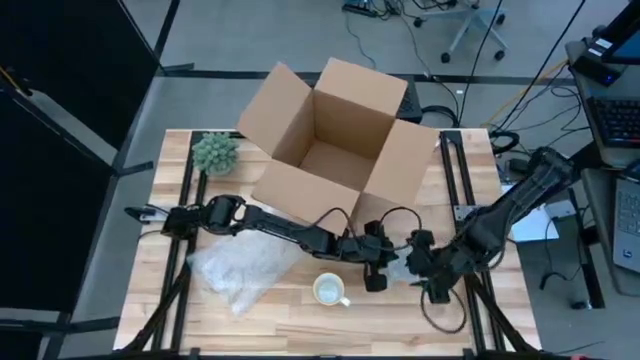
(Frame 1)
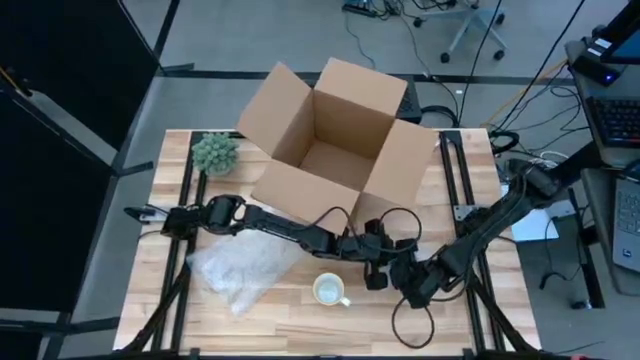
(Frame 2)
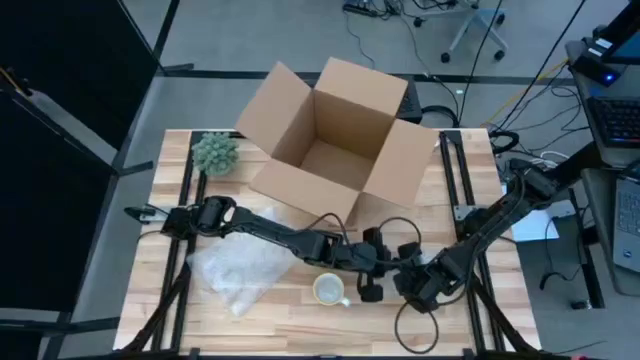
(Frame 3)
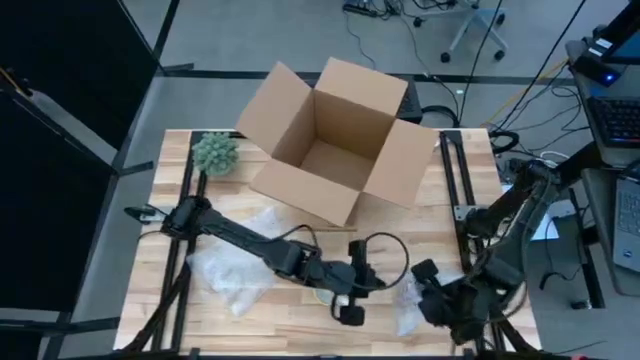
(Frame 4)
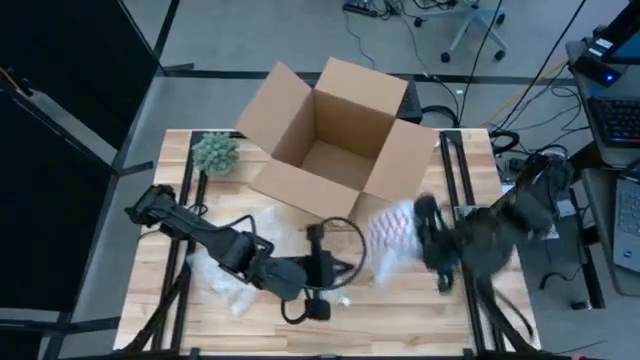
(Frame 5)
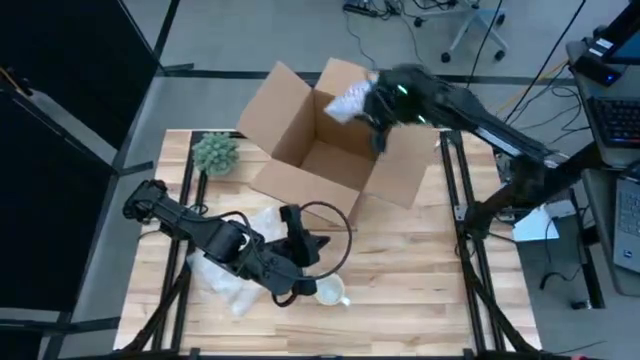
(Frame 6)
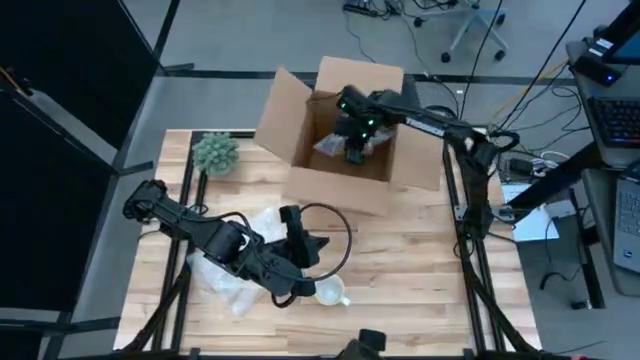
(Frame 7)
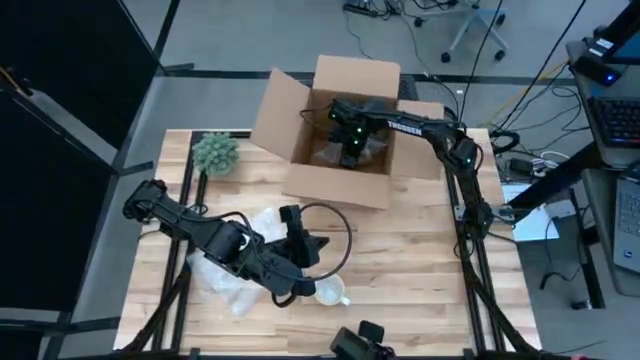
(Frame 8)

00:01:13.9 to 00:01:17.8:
Task: wrap mug
Put the red wrapped mug into the box

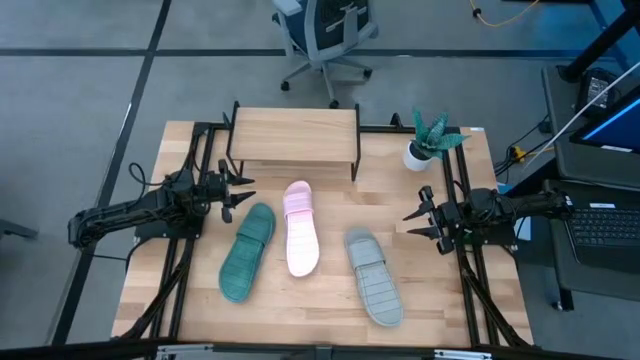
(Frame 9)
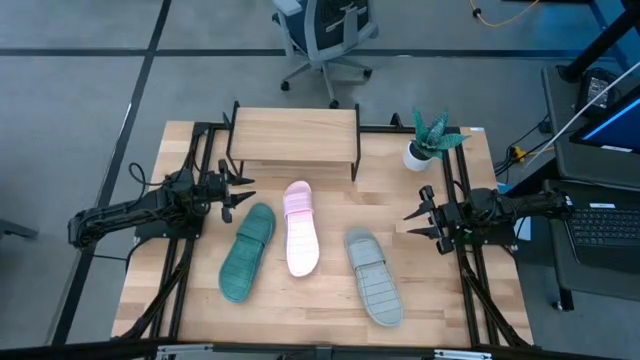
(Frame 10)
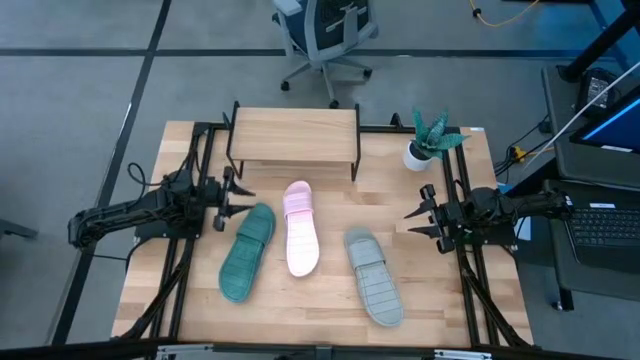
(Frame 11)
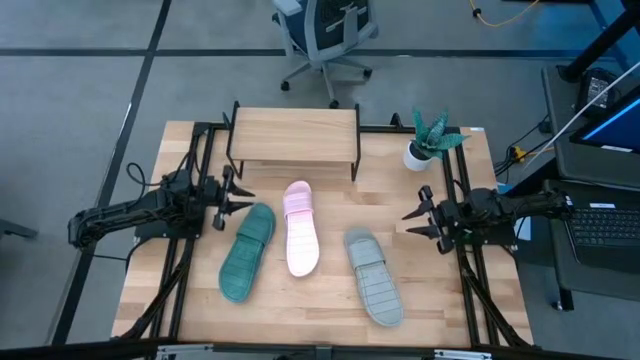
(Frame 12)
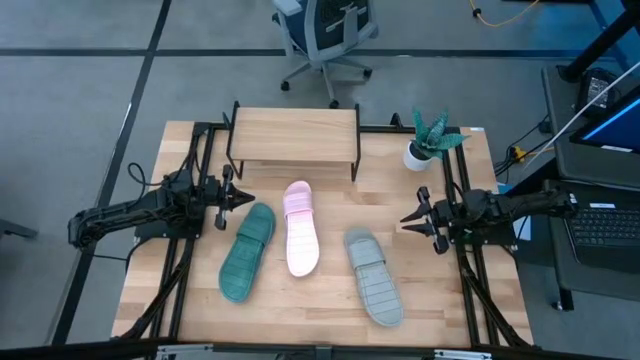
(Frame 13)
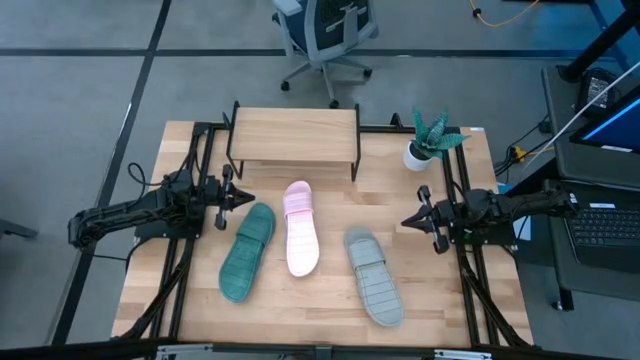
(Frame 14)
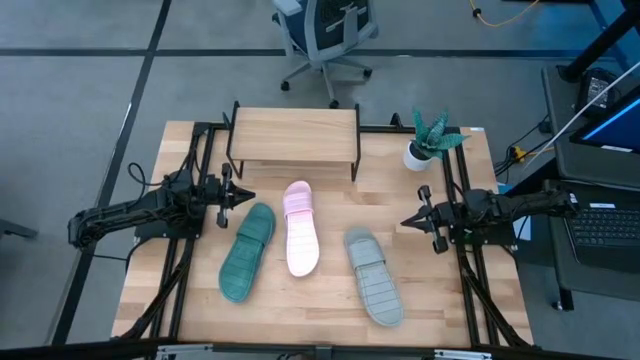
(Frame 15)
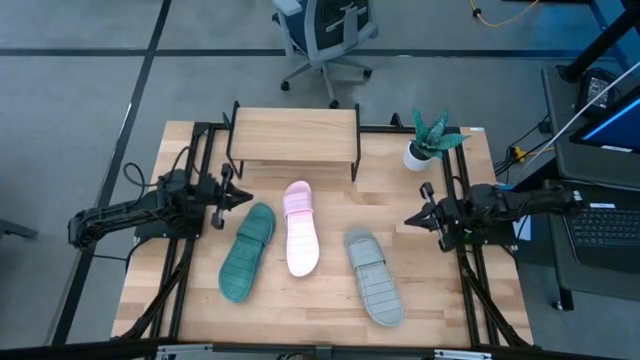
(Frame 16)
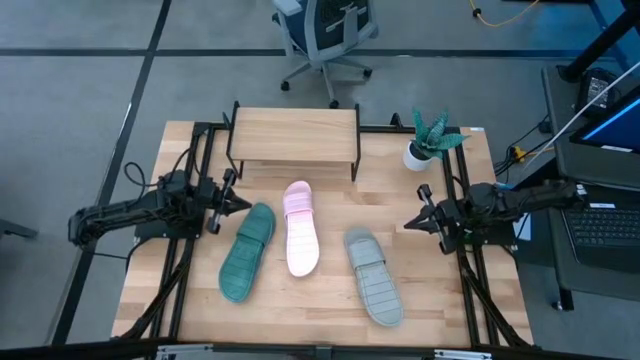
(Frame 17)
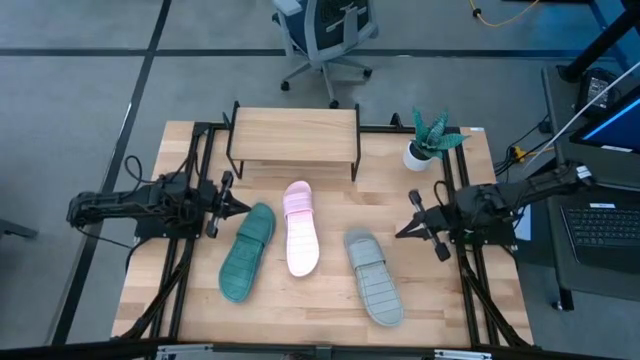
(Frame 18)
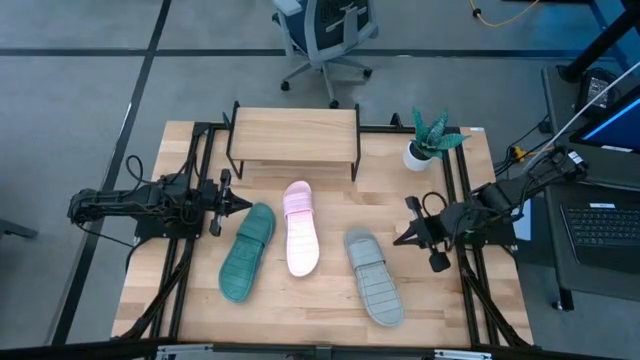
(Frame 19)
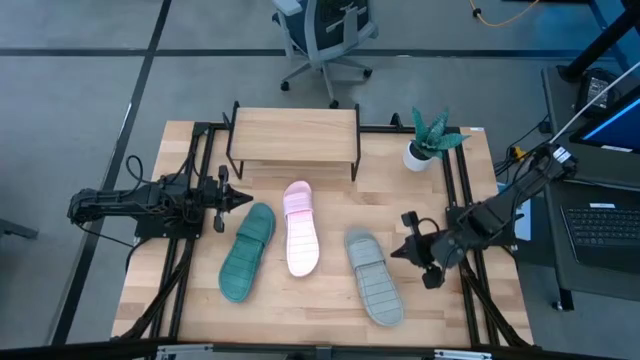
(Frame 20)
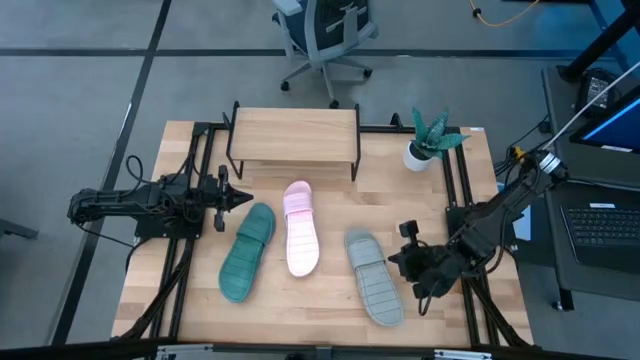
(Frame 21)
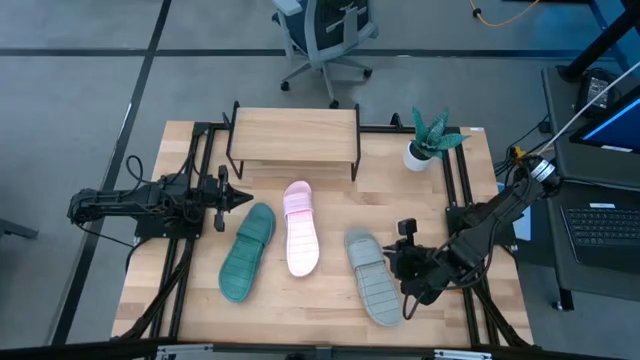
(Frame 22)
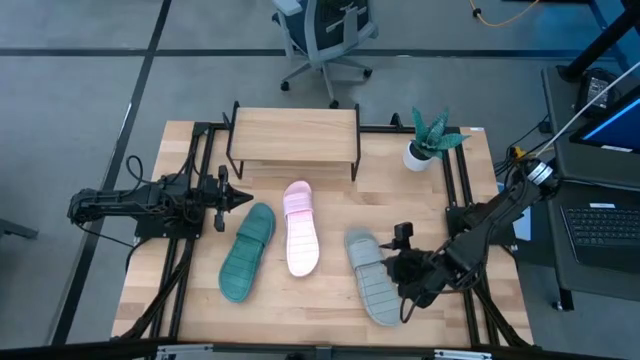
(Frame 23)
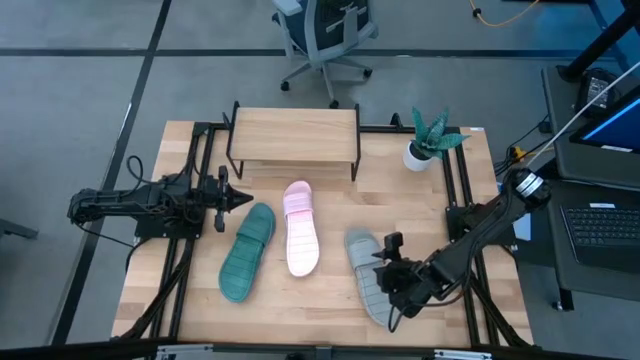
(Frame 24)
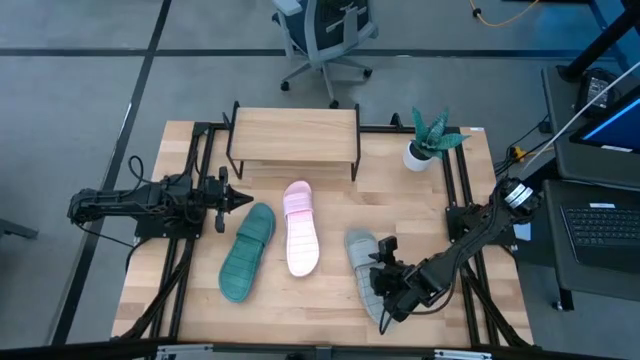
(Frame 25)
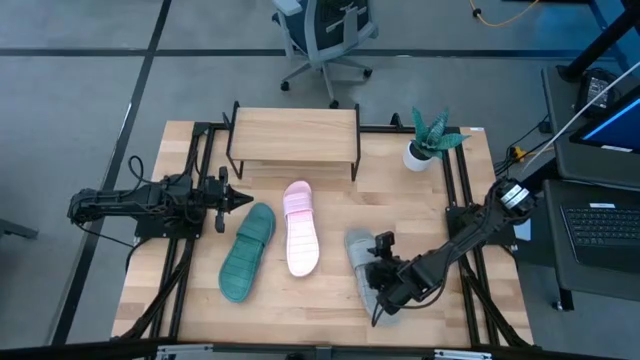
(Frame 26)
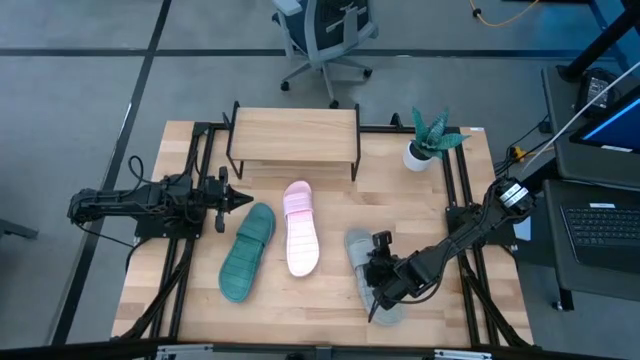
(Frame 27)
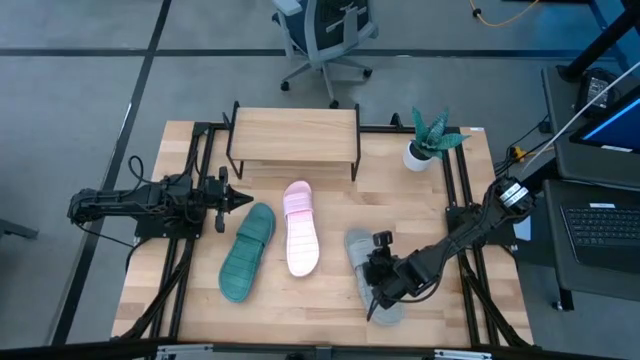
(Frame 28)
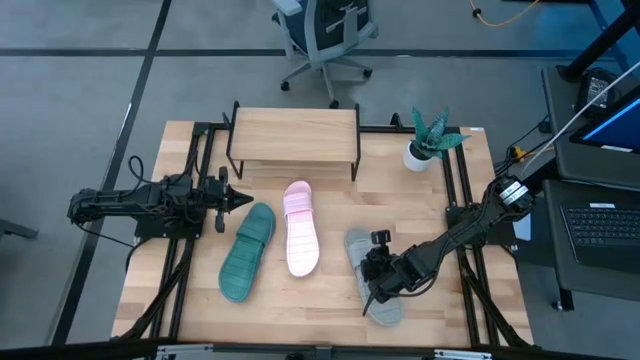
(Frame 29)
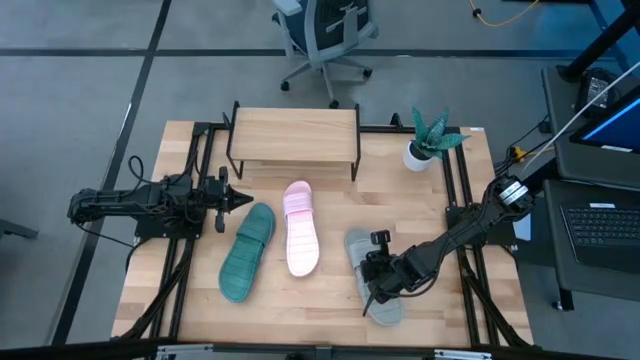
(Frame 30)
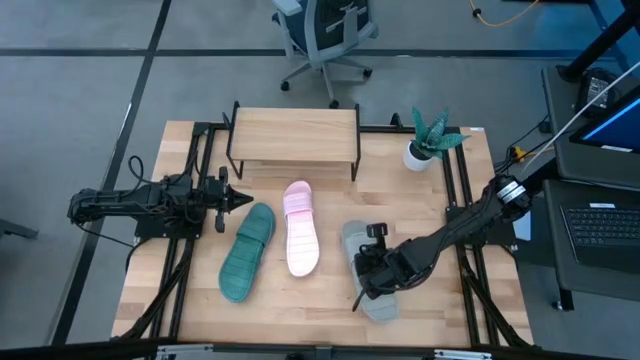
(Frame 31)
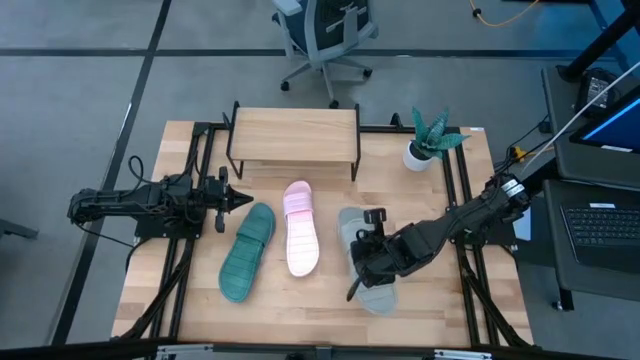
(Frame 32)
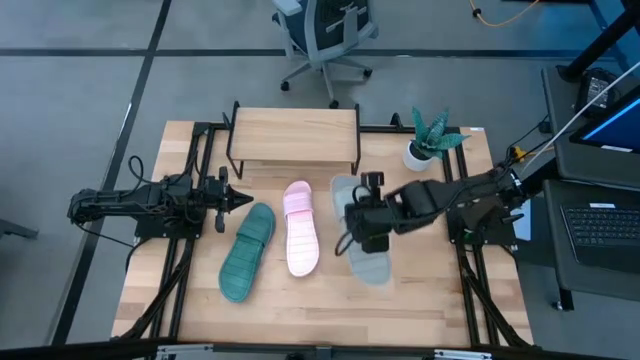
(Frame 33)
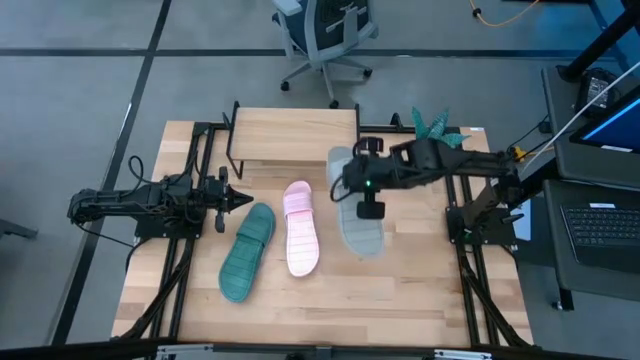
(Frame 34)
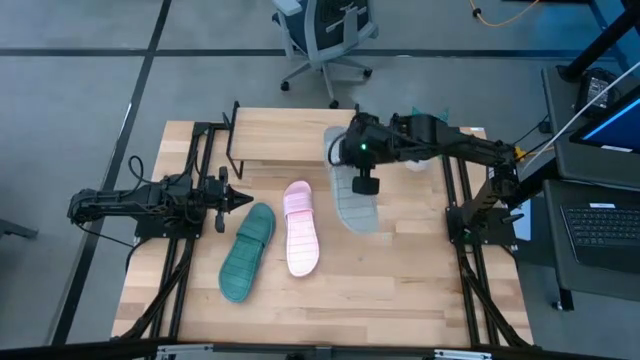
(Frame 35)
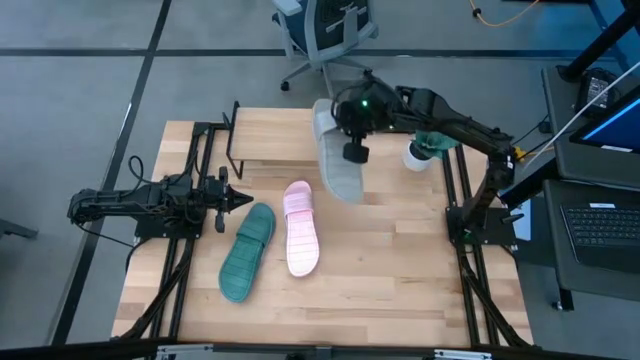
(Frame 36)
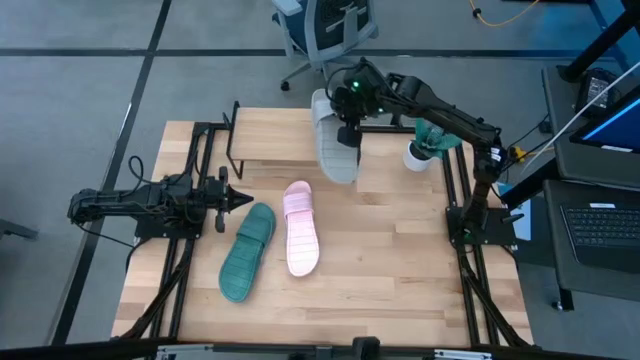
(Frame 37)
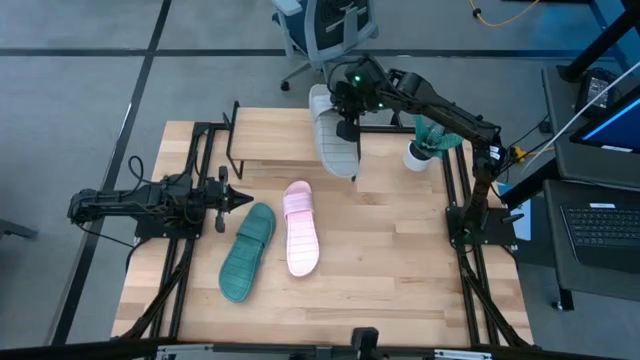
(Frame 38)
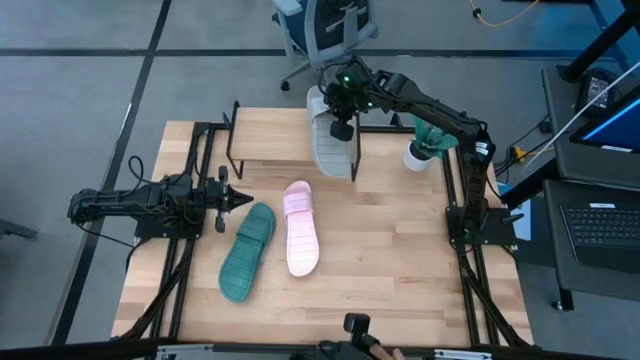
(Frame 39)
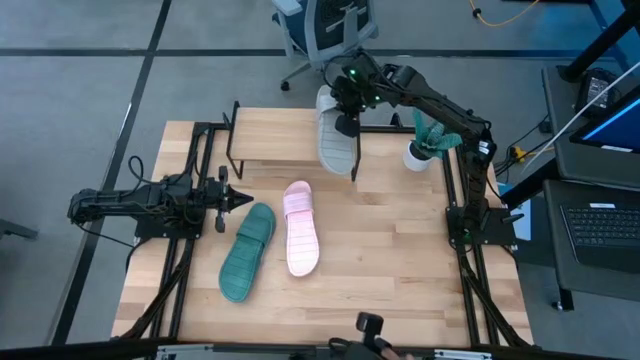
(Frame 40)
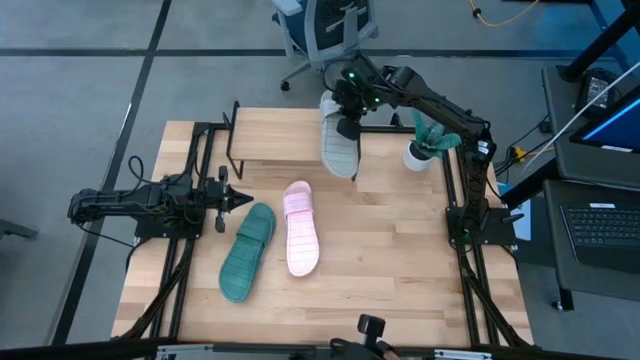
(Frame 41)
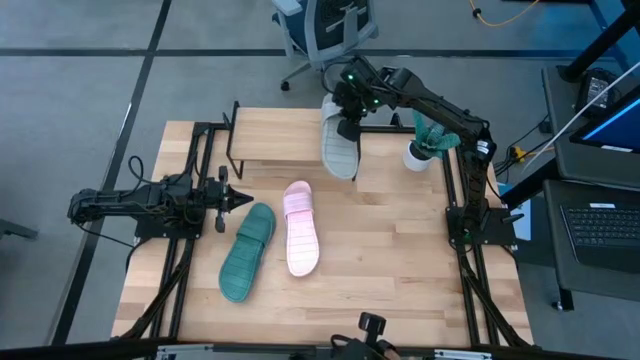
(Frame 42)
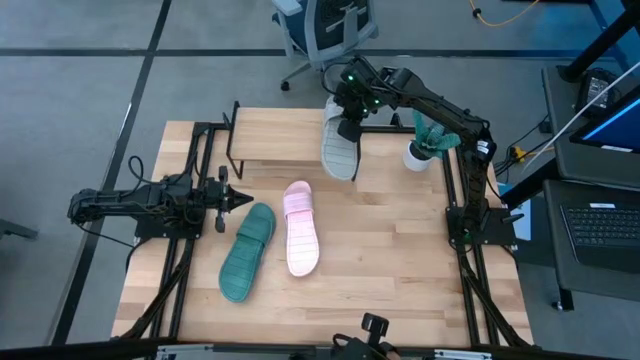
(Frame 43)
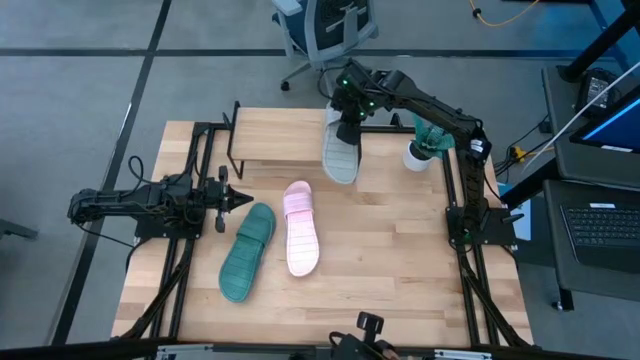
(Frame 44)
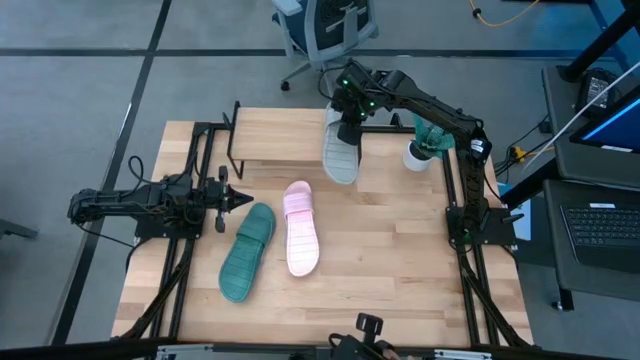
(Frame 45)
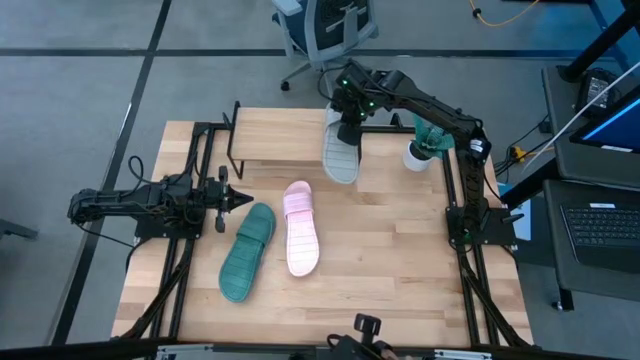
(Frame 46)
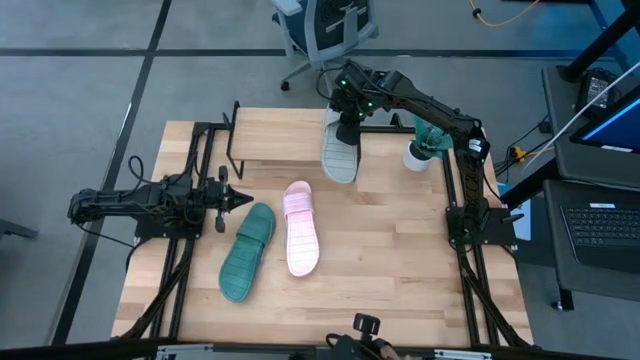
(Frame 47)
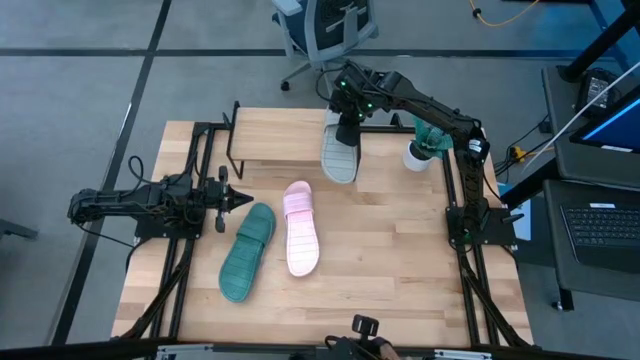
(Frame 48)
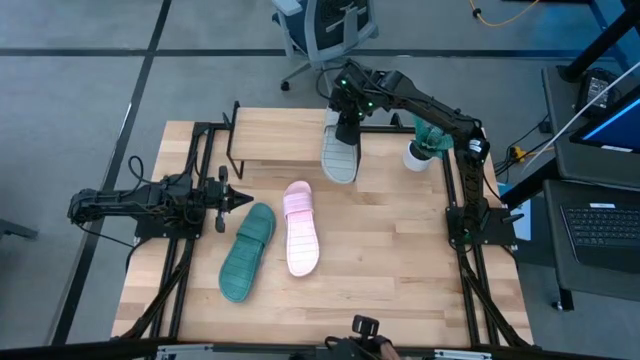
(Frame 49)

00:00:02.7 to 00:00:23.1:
Task: Pick and place slippers onto the shelf
Put the pair of gray slippers on the shelf
